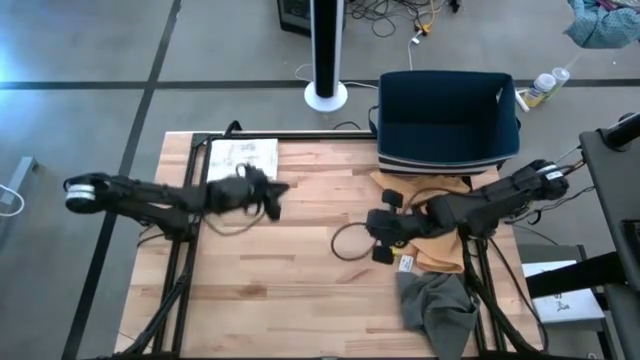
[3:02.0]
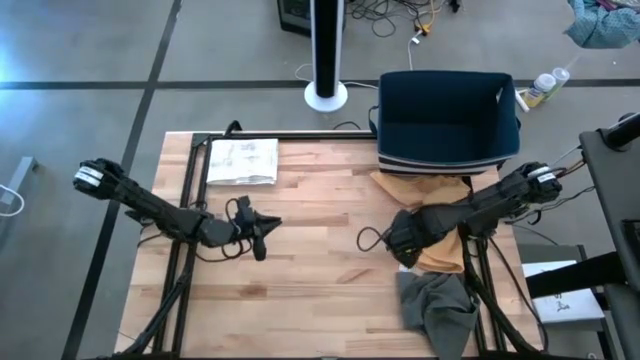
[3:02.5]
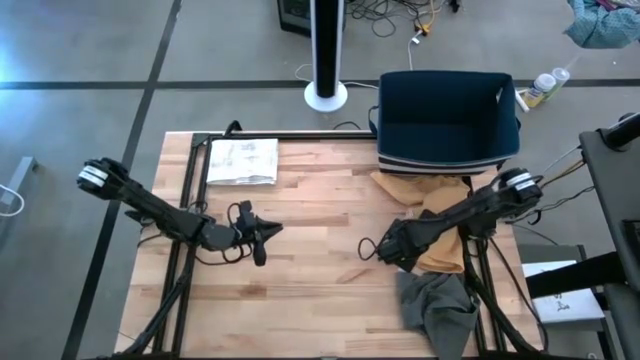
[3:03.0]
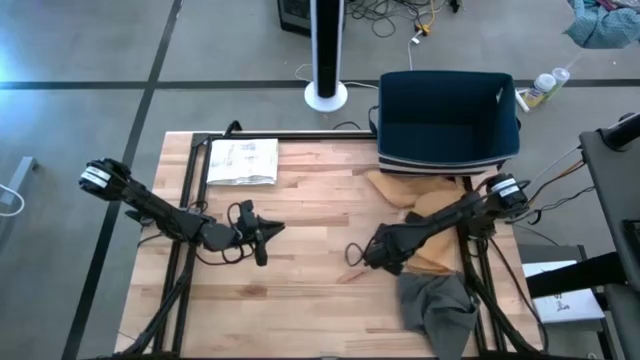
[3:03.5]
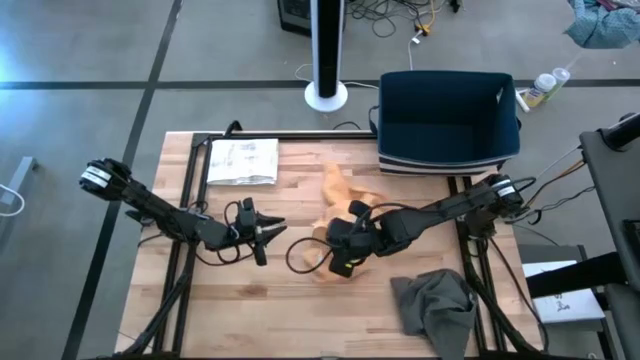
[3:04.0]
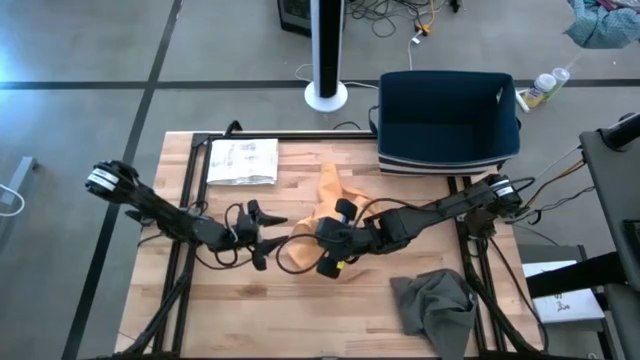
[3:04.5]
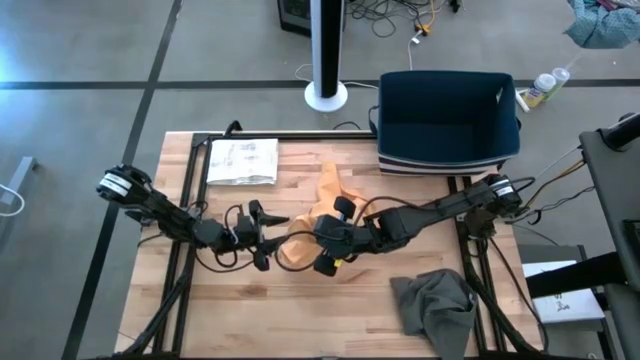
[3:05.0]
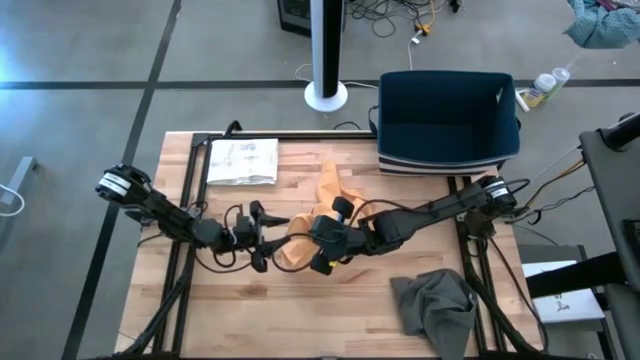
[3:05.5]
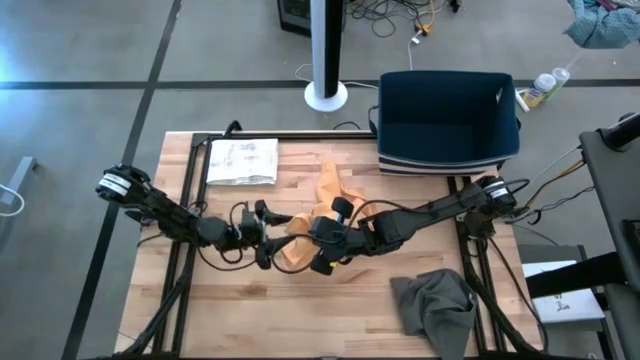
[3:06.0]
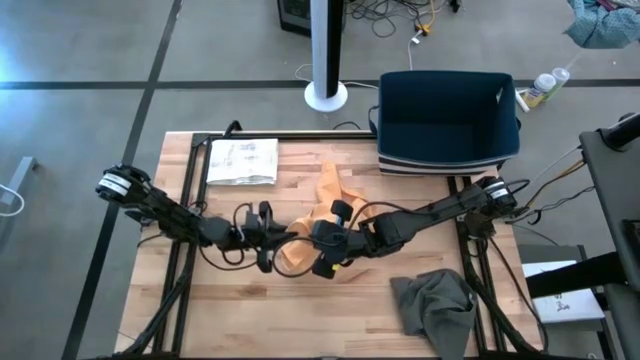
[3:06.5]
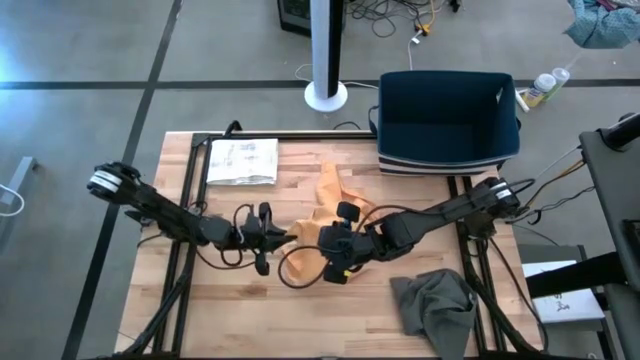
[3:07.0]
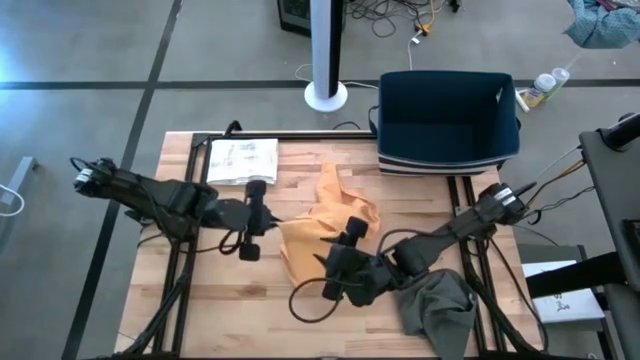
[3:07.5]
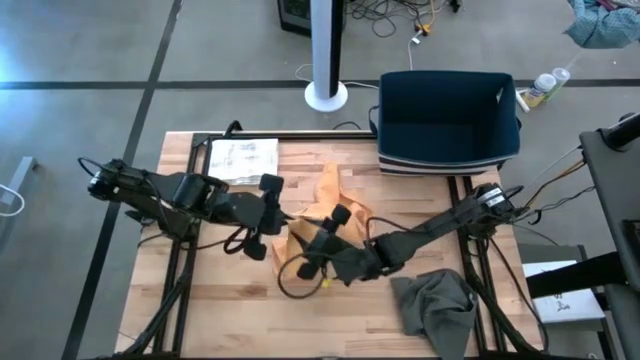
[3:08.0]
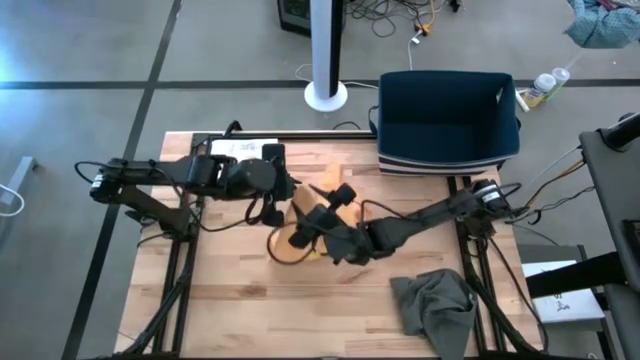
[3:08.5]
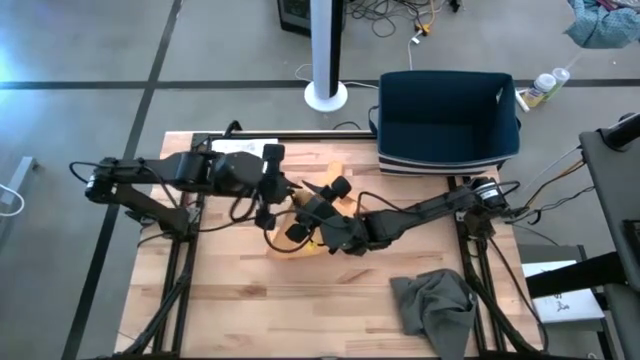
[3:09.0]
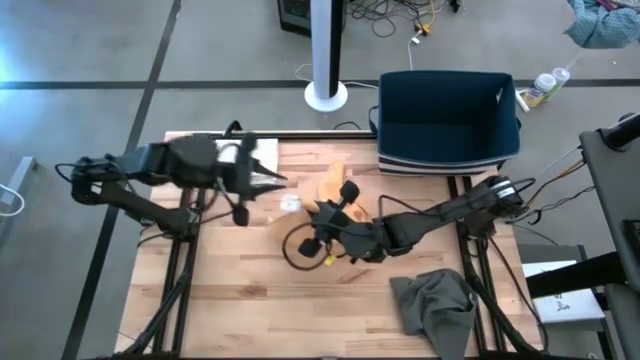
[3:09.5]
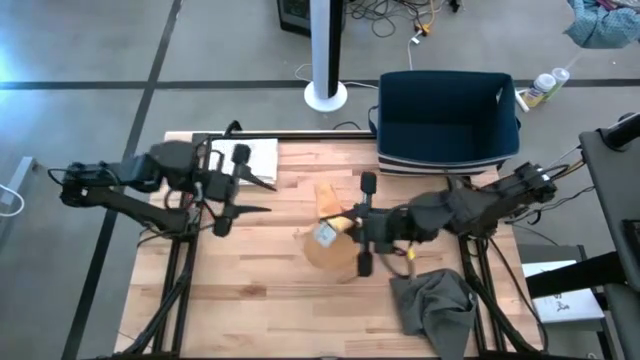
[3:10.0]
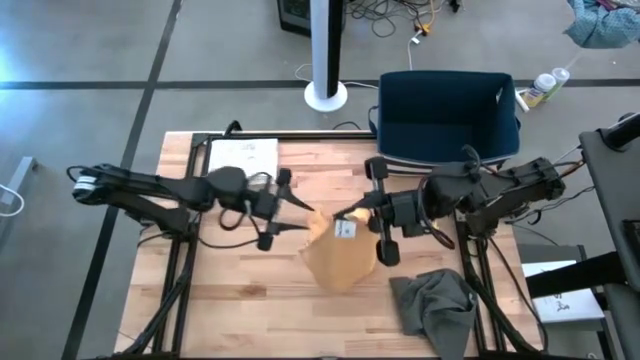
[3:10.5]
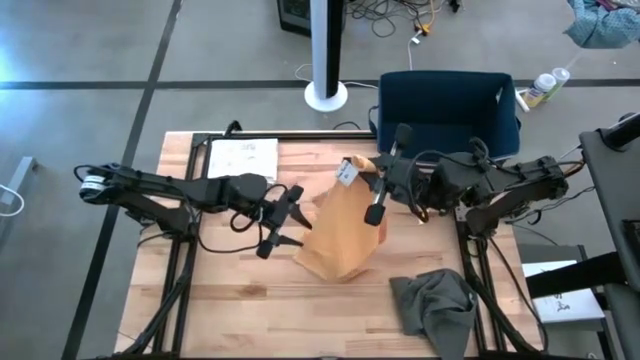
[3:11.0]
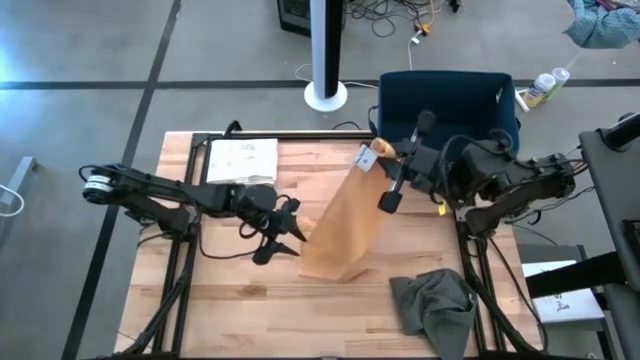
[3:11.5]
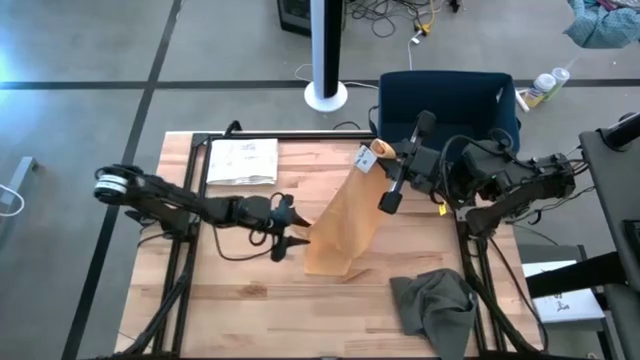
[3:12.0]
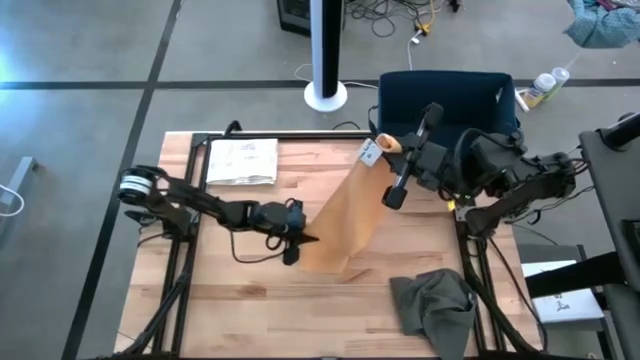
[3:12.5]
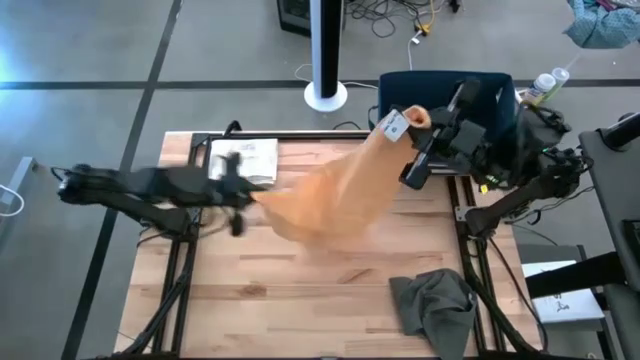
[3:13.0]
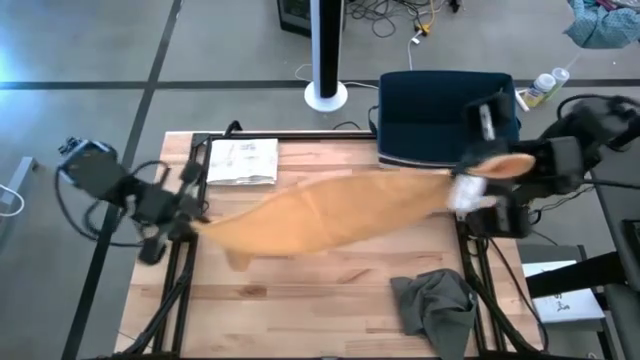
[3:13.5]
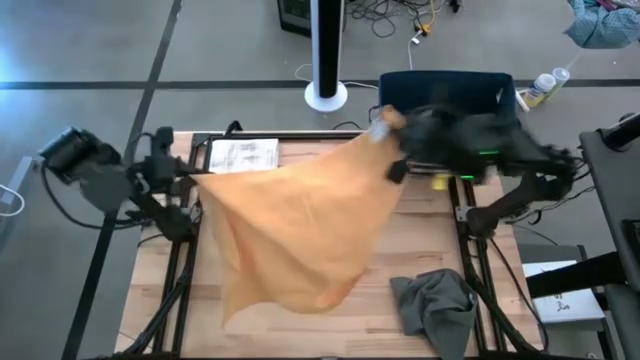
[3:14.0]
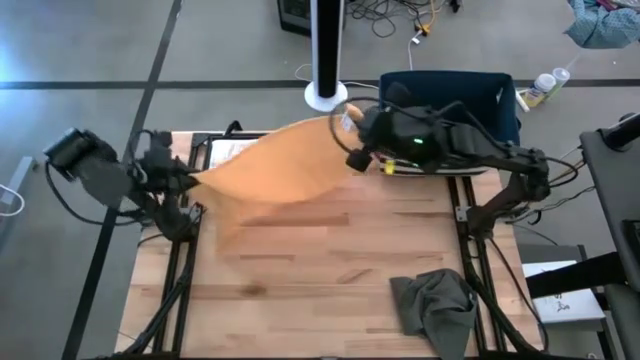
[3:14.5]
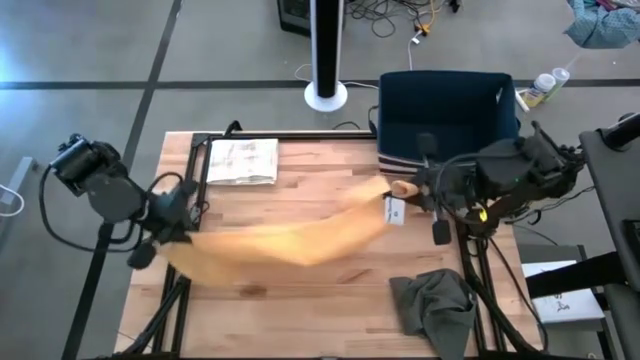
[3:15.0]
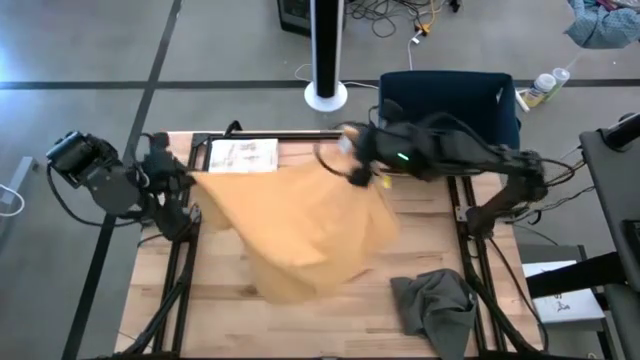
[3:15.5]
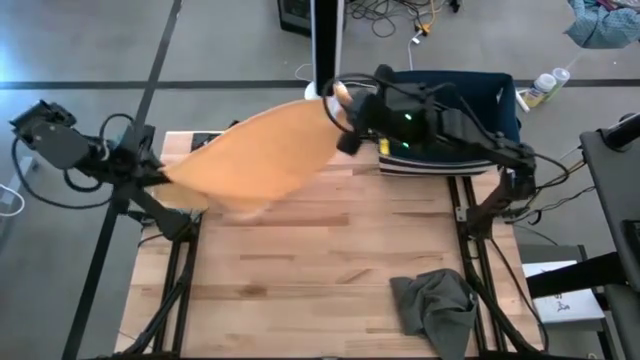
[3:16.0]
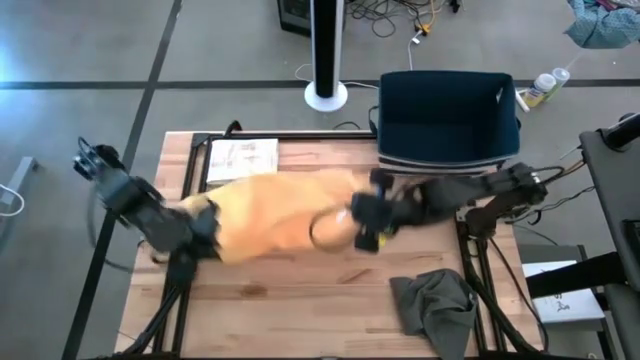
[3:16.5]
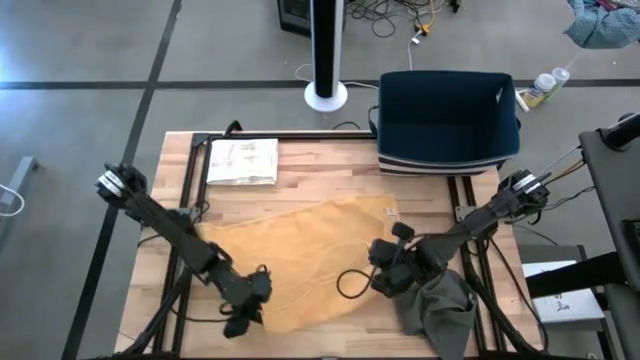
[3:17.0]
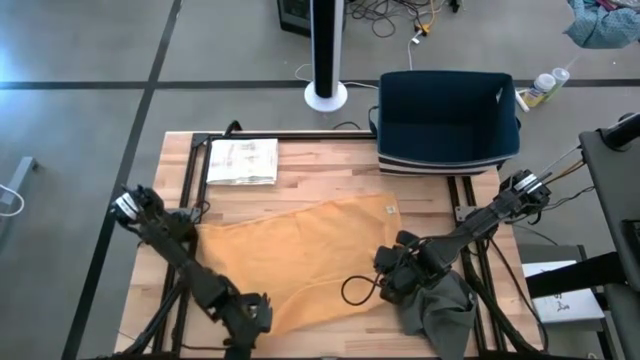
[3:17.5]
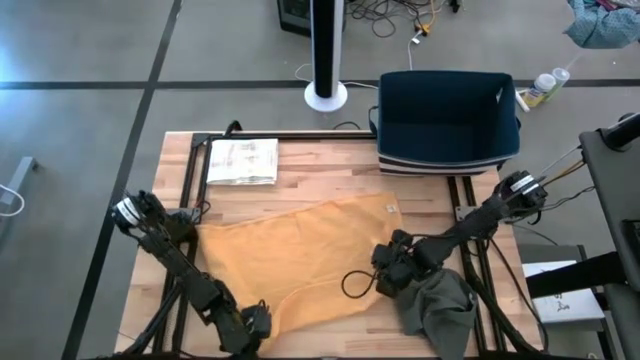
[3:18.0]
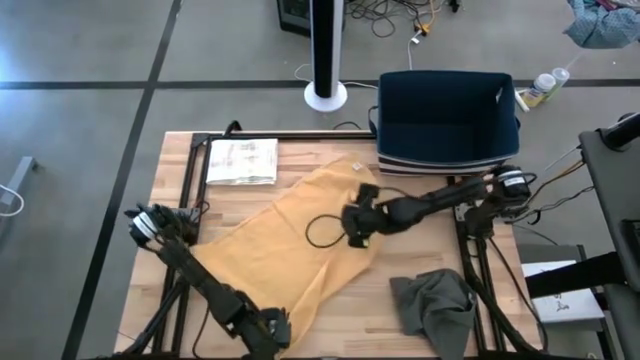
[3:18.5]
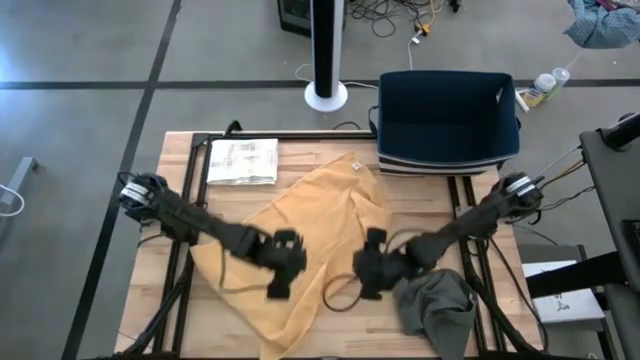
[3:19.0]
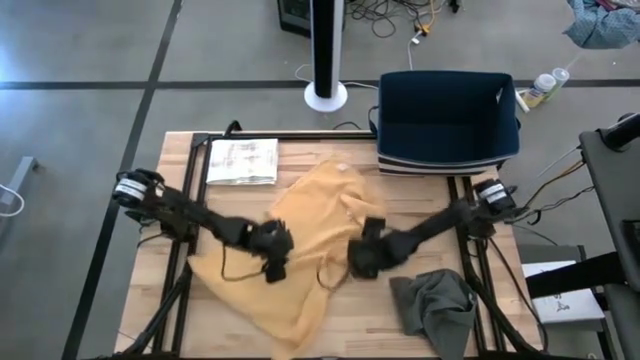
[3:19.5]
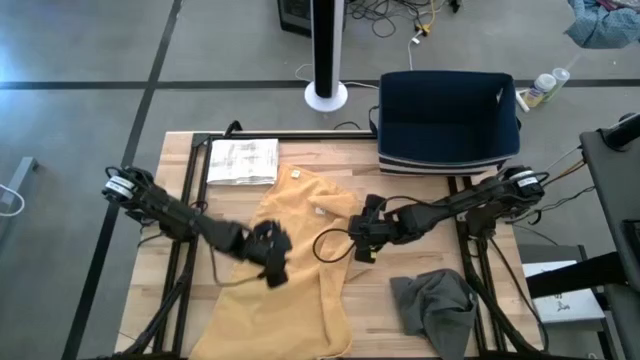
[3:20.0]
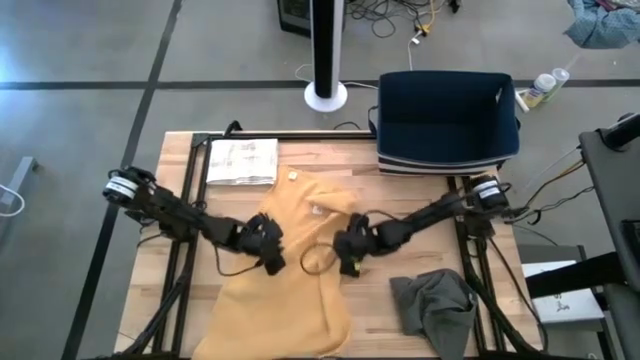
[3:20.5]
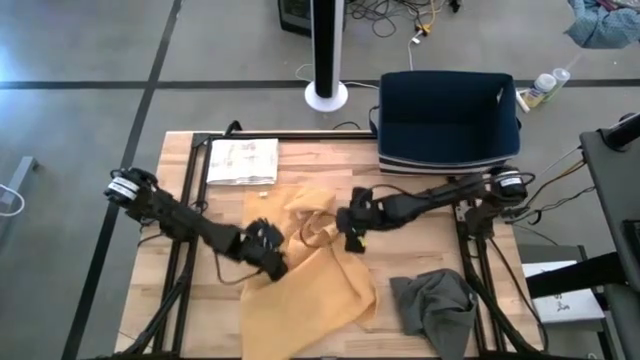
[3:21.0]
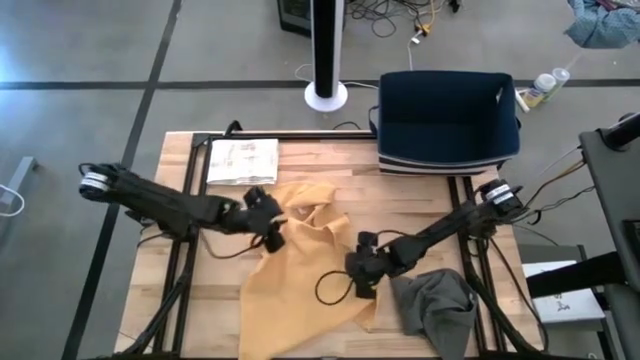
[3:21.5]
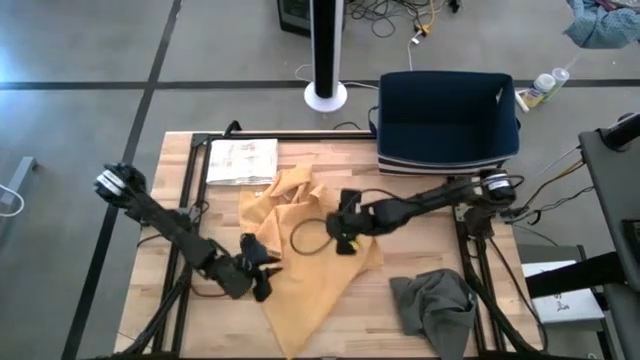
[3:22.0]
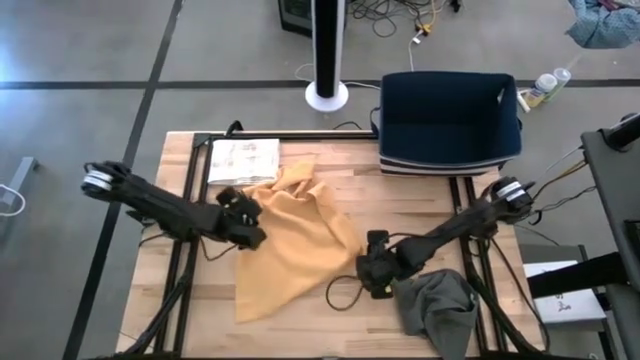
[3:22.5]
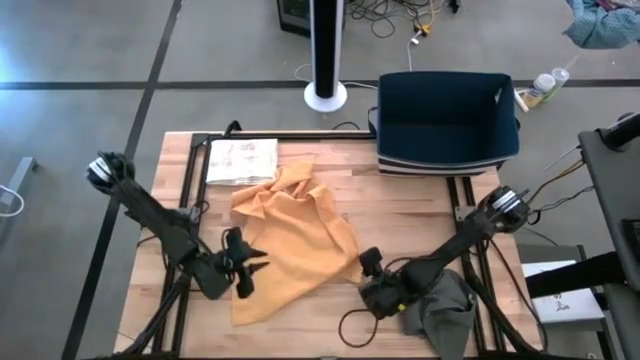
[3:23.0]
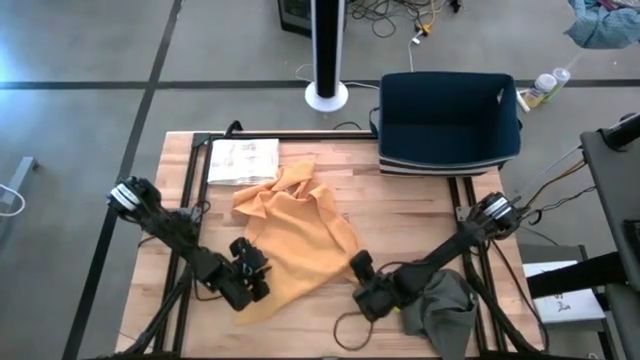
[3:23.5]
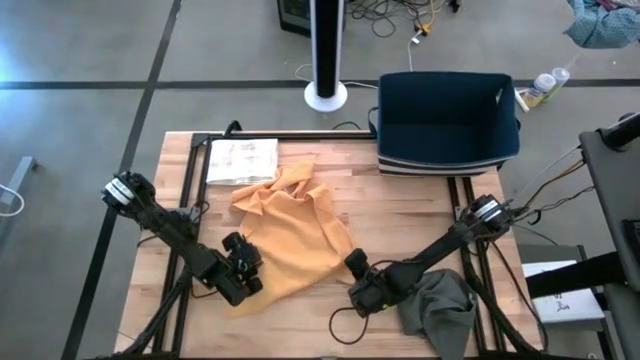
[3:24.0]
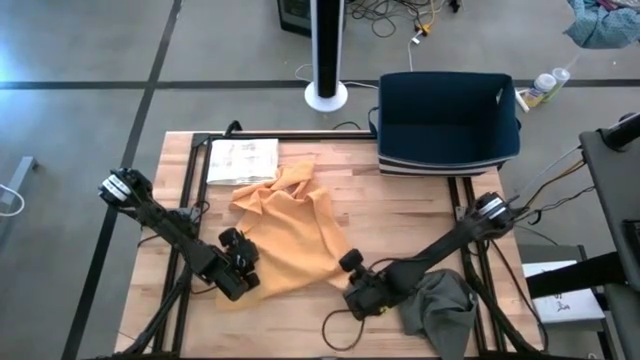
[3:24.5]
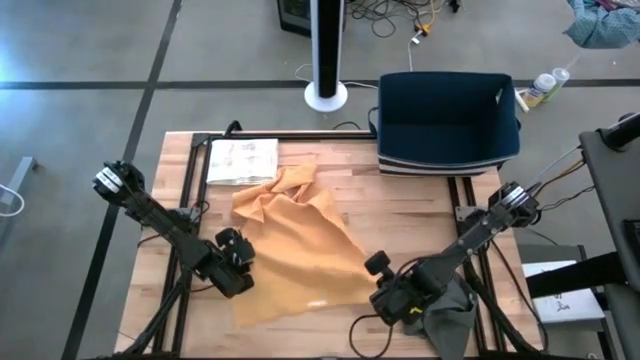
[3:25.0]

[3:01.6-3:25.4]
Task: Fold towel
Fold the yellow towel
